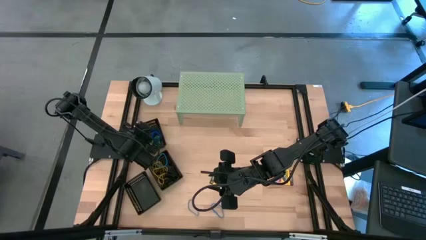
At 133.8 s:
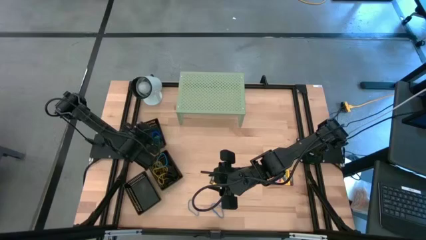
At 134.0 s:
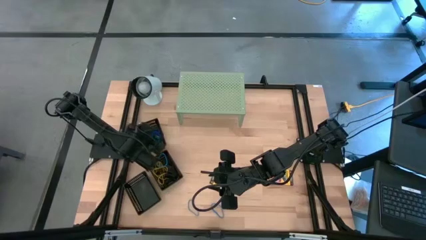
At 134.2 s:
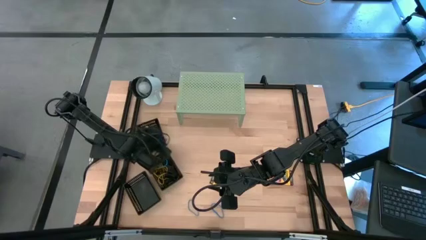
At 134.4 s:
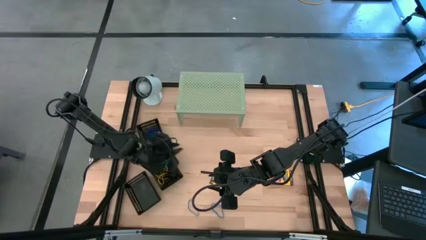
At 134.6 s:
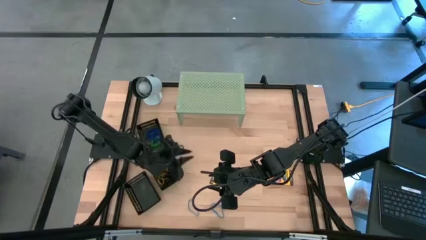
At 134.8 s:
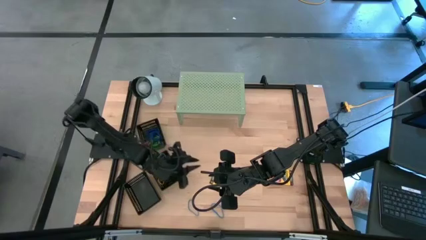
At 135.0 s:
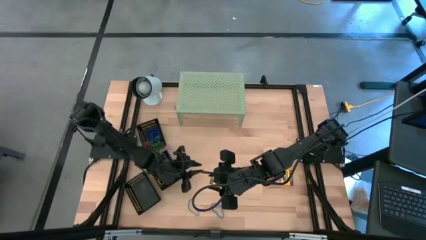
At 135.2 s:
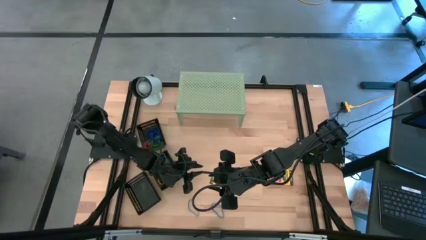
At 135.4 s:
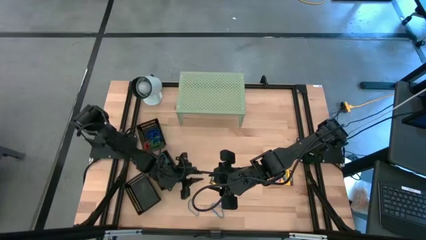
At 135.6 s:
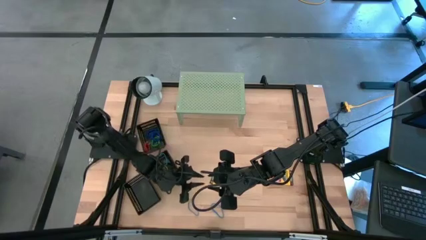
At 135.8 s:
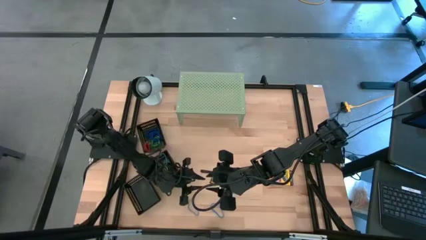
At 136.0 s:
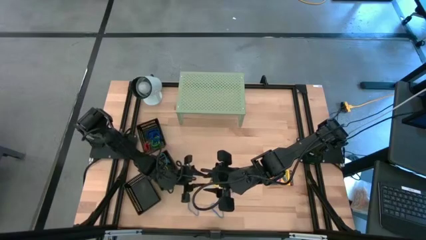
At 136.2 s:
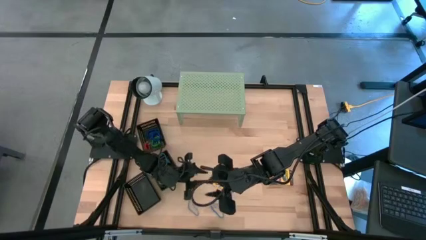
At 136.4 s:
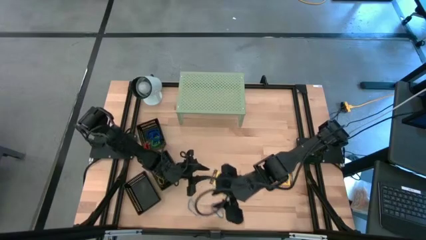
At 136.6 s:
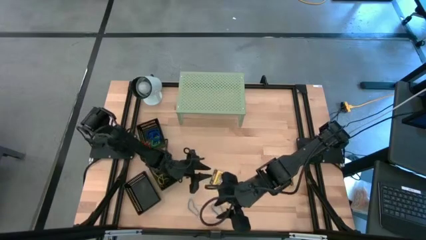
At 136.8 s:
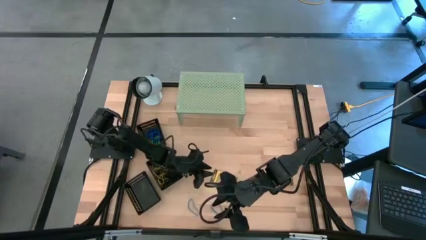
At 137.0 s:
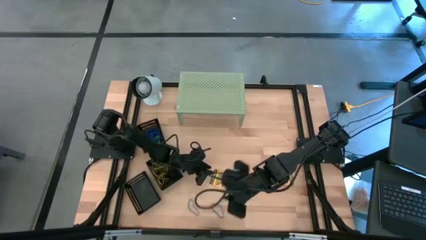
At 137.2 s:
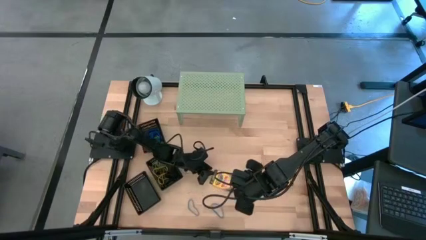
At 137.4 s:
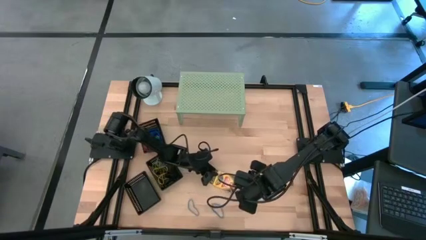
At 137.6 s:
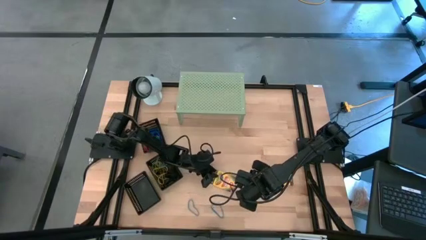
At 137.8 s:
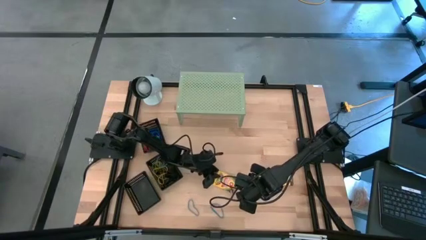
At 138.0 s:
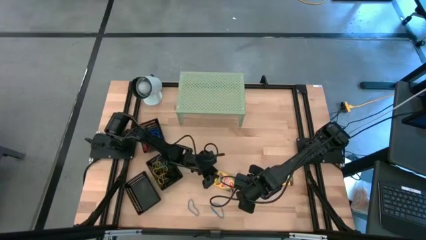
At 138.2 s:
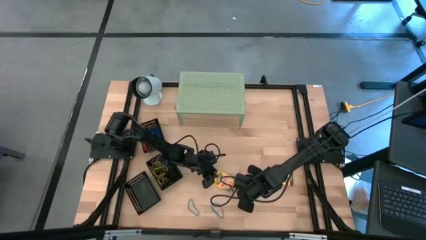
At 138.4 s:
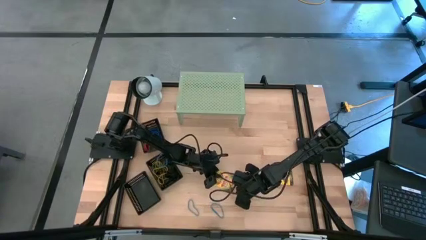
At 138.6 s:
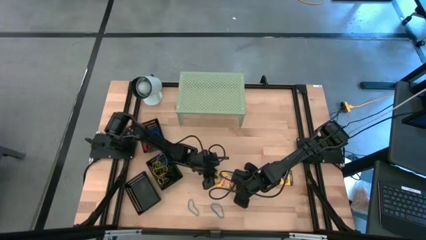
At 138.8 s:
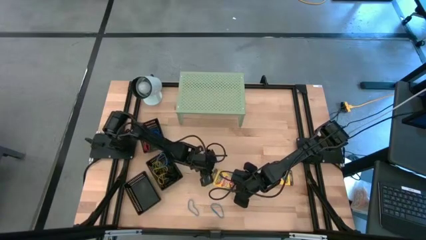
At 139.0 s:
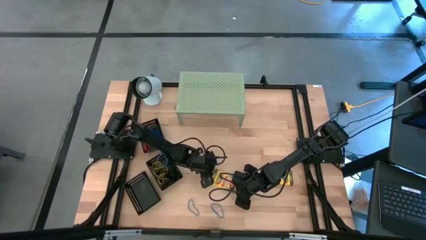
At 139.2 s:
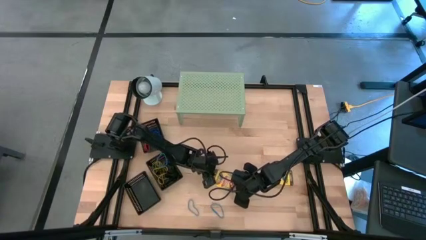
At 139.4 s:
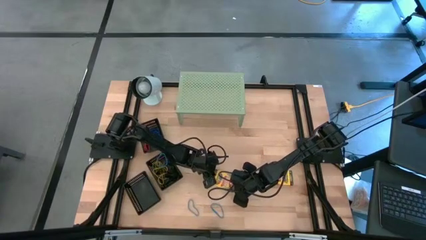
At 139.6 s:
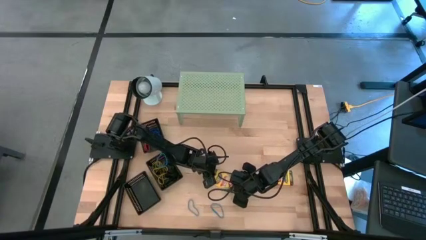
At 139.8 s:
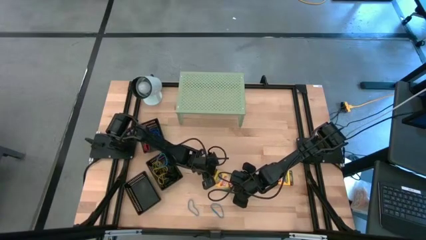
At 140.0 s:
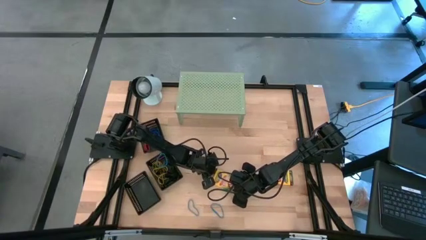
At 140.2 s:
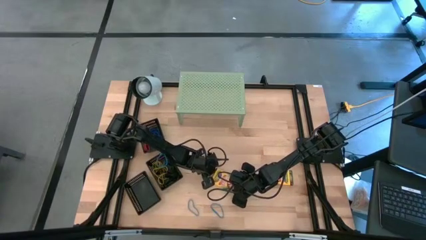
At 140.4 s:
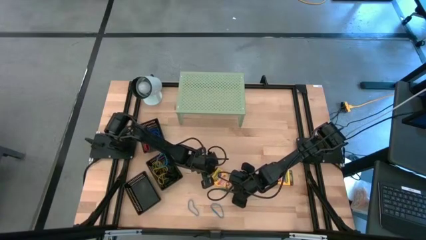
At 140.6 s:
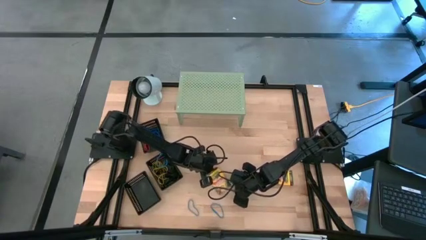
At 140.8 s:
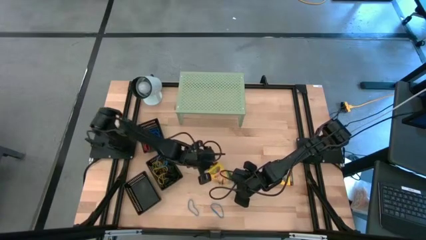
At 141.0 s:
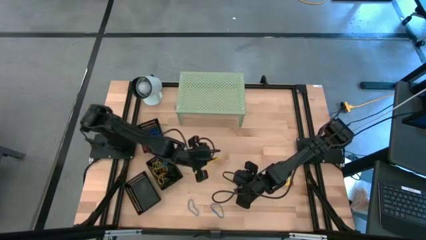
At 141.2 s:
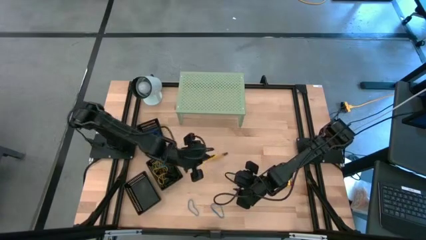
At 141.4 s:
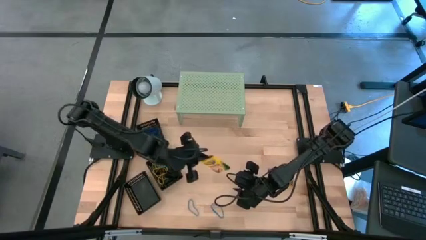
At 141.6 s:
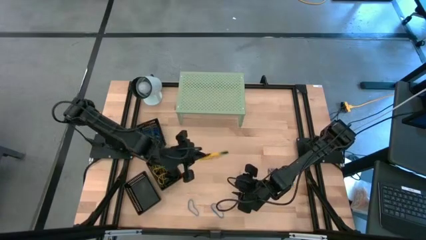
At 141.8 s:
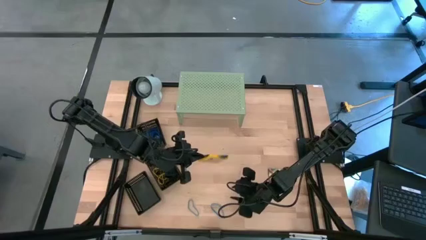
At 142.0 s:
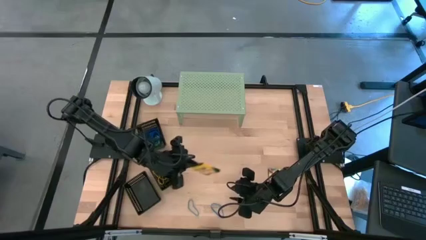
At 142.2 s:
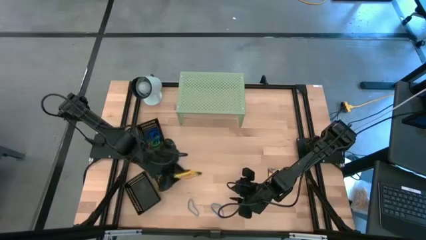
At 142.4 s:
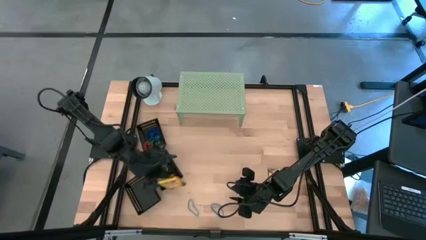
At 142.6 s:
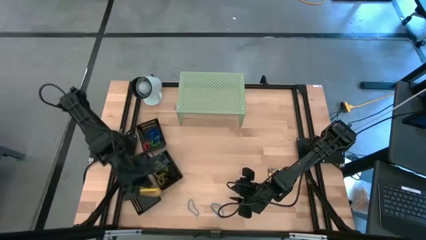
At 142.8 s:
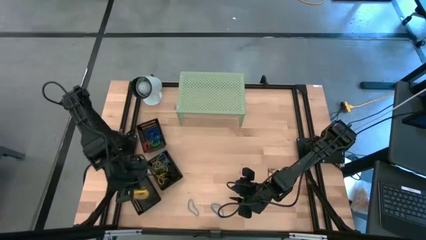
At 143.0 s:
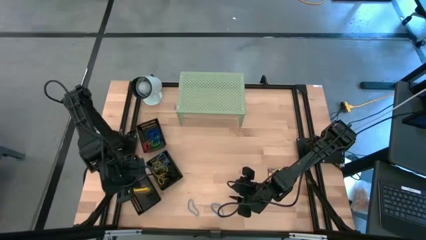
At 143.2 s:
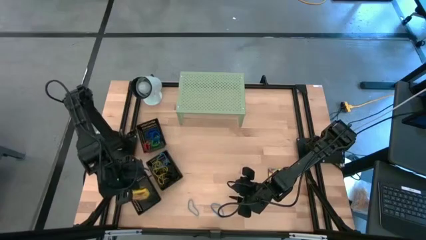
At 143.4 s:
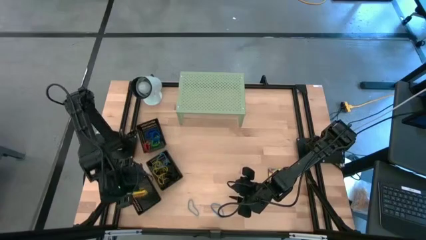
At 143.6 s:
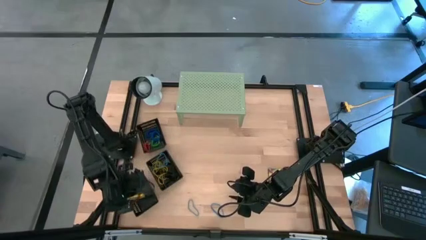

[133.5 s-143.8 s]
Task: Pick & Place Office Desk Supplies
Put the right crayon box into the bottom black bin

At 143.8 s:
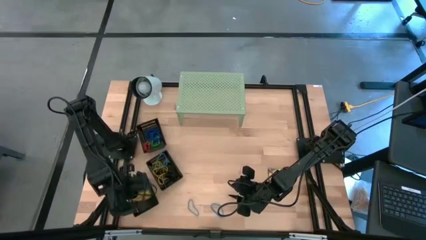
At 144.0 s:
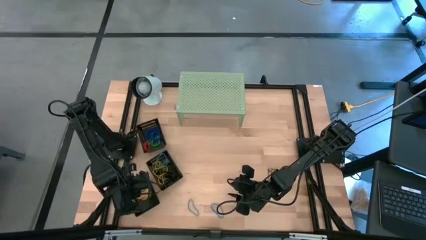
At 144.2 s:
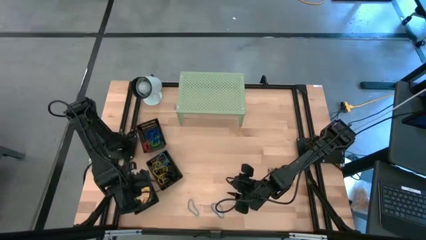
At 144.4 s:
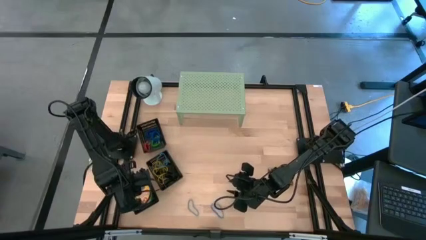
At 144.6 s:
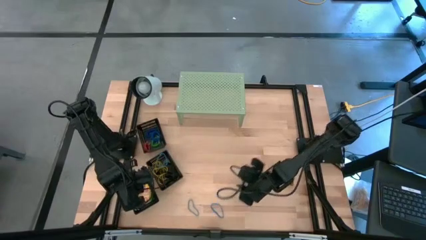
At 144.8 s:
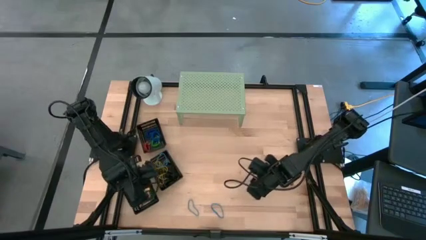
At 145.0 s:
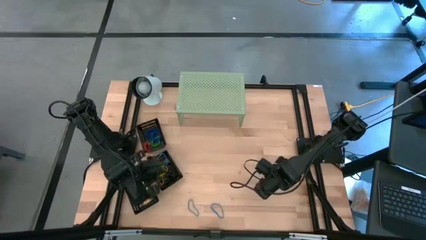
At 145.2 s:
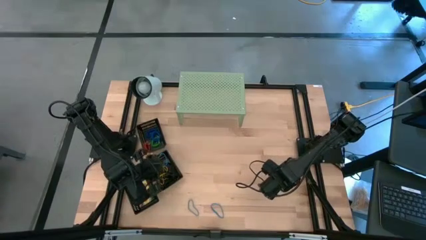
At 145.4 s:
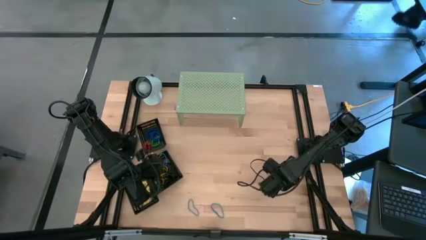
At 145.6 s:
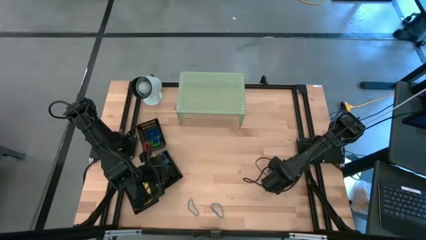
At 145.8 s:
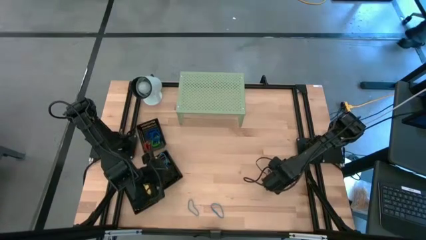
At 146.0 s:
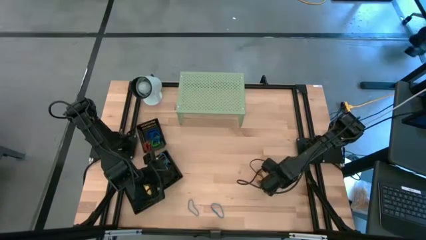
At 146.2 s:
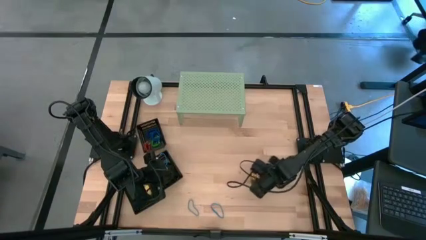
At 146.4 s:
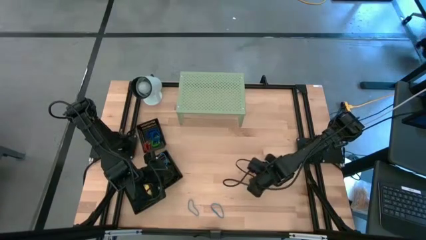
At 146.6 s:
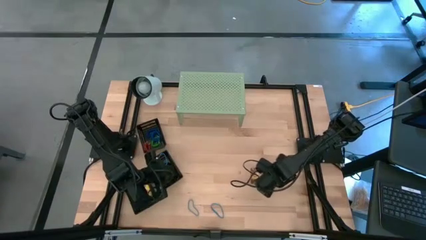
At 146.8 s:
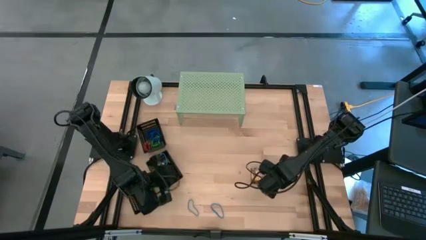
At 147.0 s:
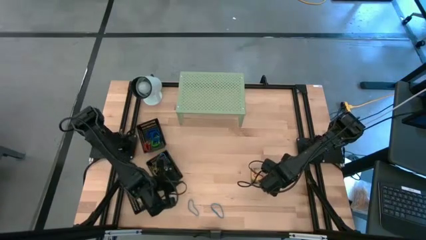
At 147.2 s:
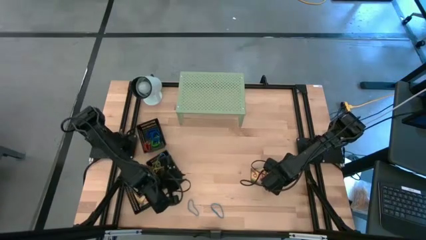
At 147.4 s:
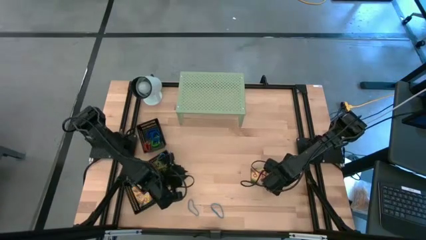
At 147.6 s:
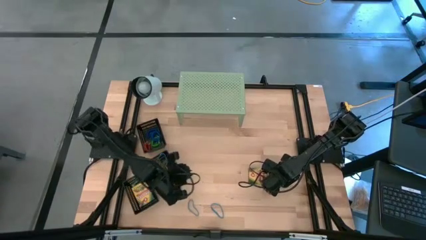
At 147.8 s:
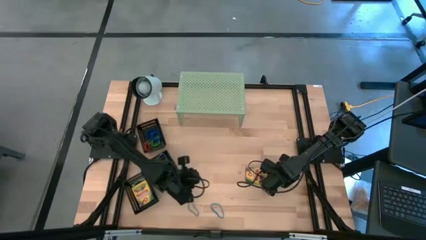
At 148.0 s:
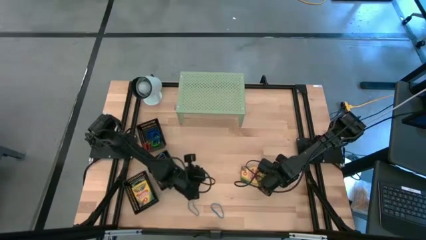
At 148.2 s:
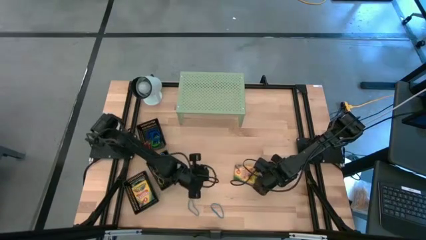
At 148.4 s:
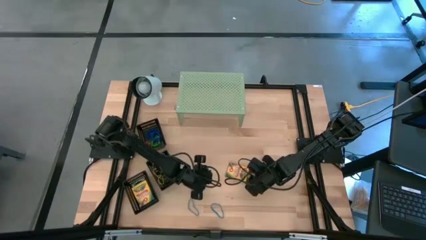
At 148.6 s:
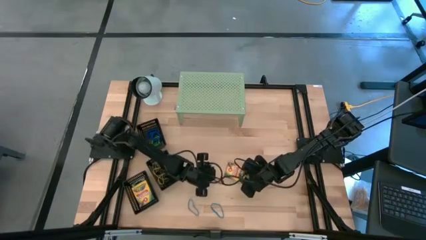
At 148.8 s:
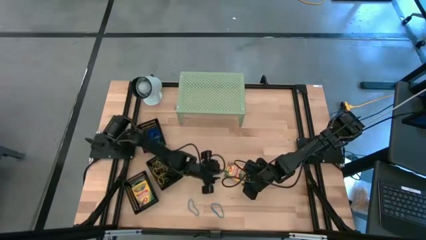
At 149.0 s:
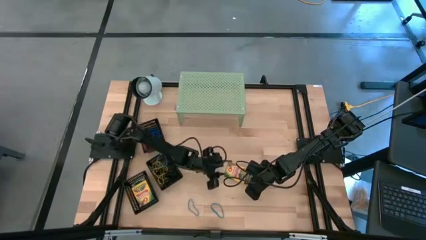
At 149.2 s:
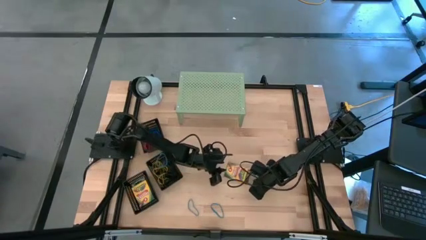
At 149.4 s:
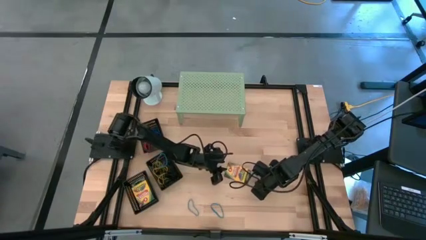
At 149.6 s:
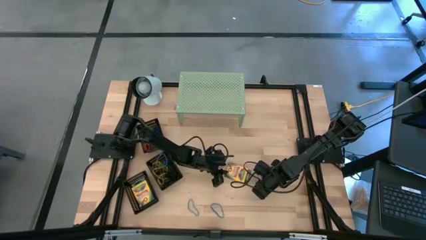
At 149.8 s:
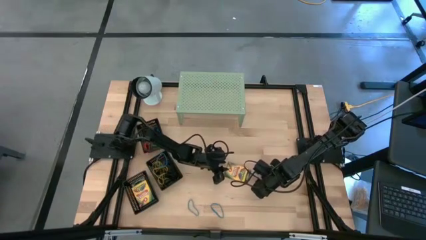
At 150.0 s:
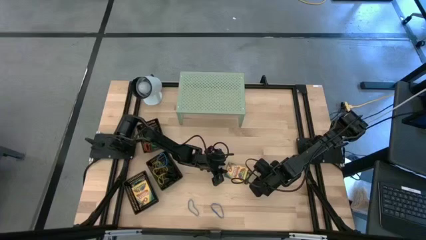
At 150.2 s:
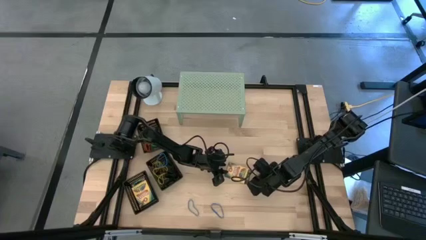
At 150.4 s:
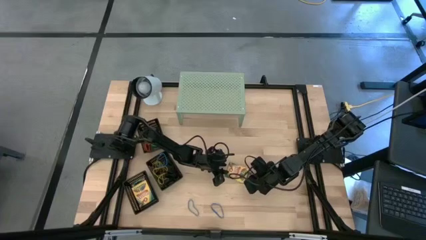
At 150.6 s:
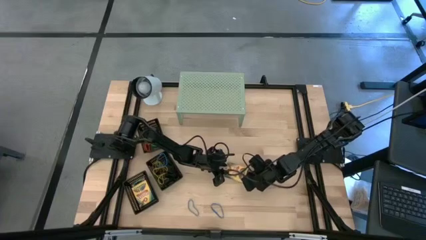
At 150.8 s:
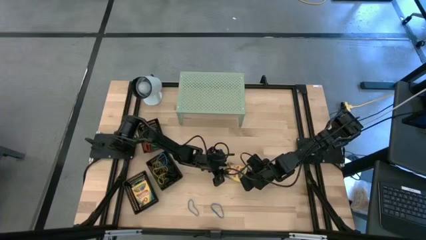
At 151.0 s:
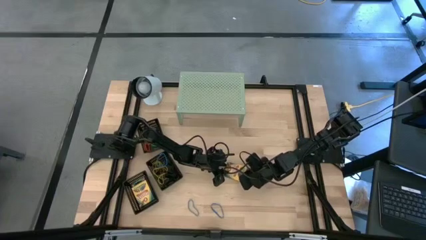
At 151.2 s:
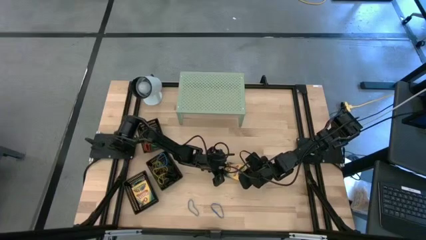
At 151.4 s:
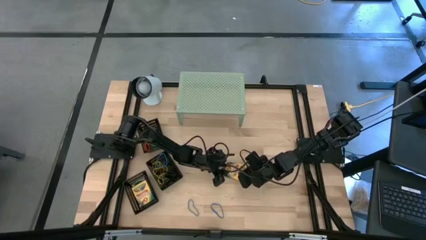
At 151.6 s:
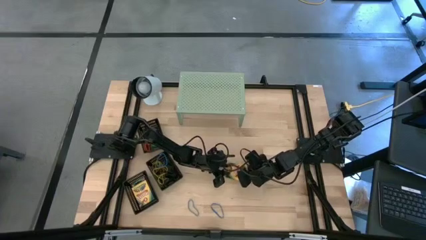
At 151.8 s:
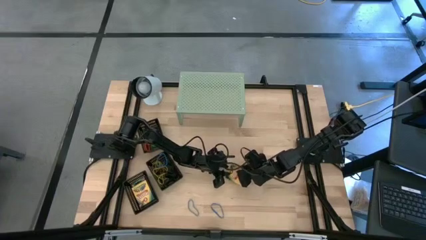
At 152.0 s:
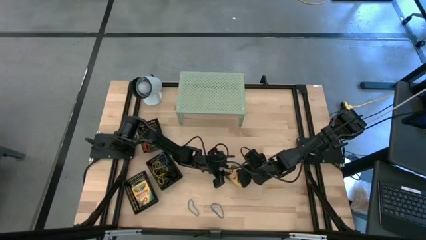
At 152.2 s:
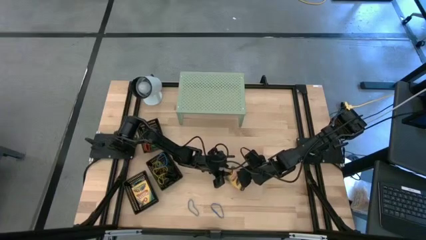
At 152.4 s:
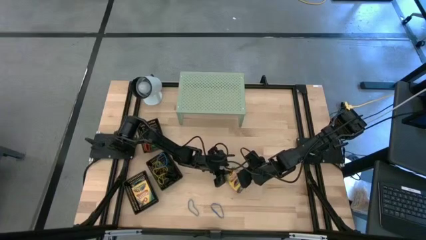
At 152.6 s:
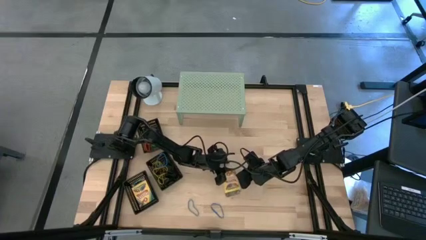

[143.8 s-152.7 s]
Put the crayon box into the bottom black bin
